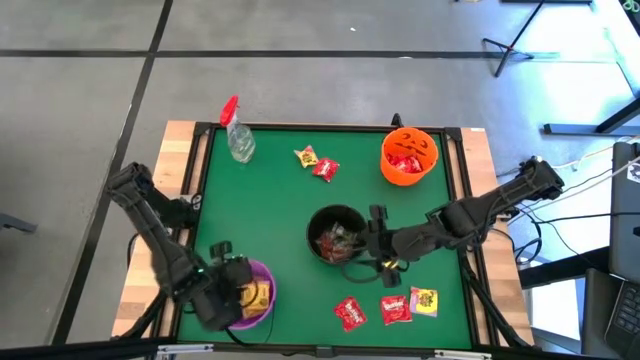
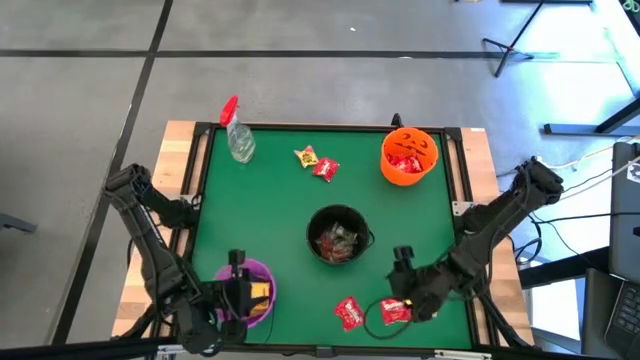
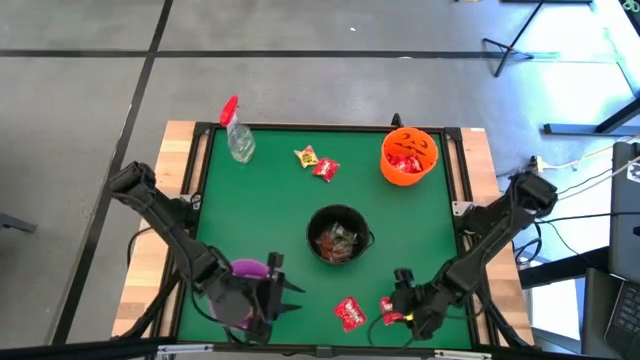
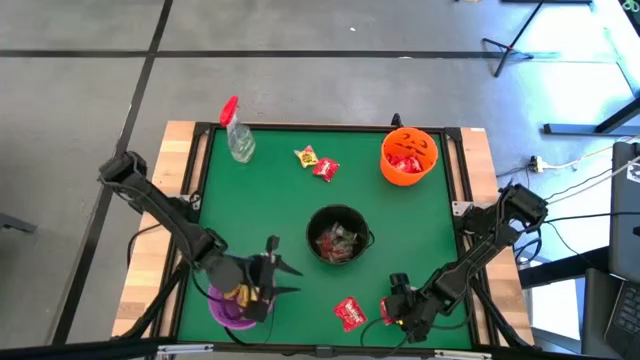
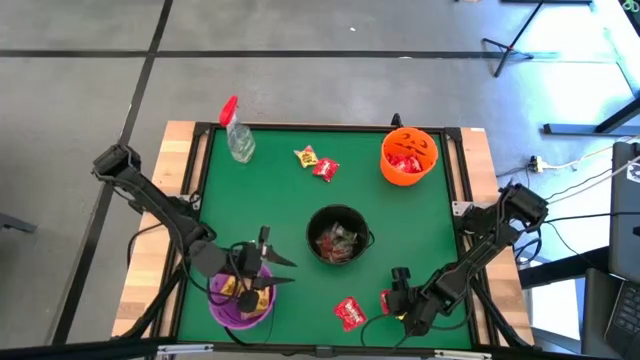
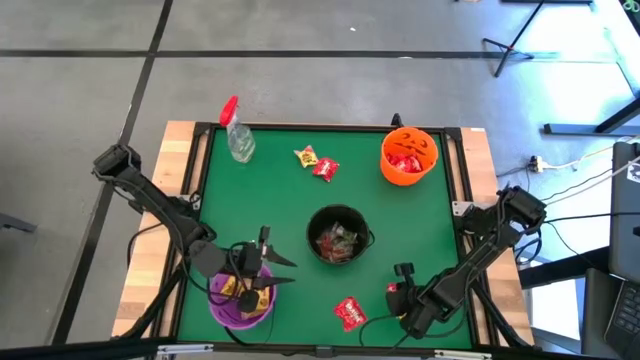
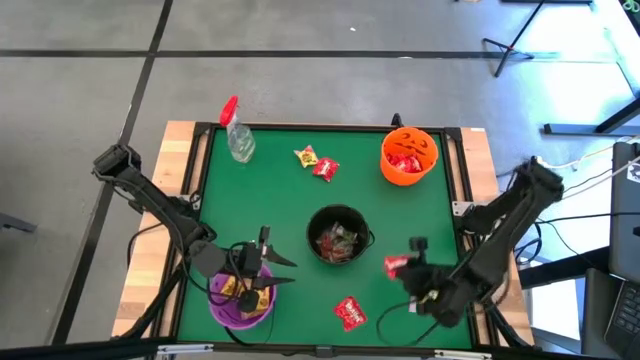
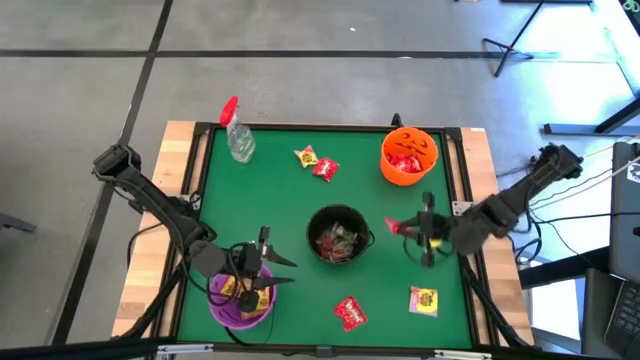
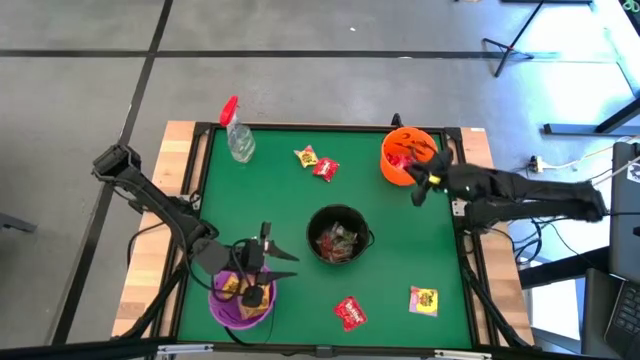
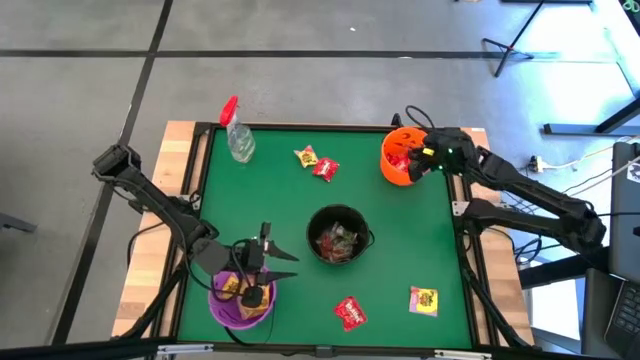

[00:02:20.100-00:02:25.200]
Task: Sort candy
Put the red candy into the orange bucket

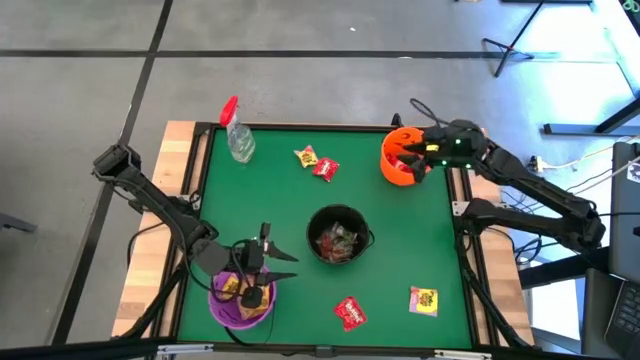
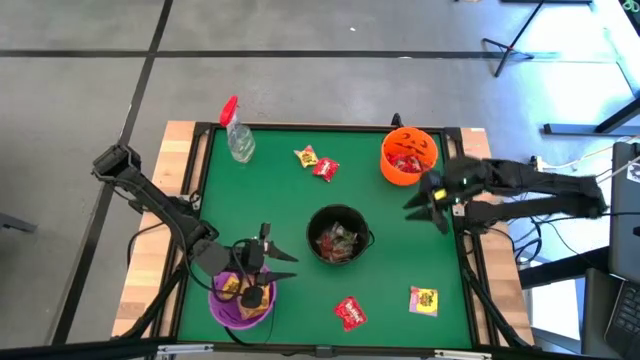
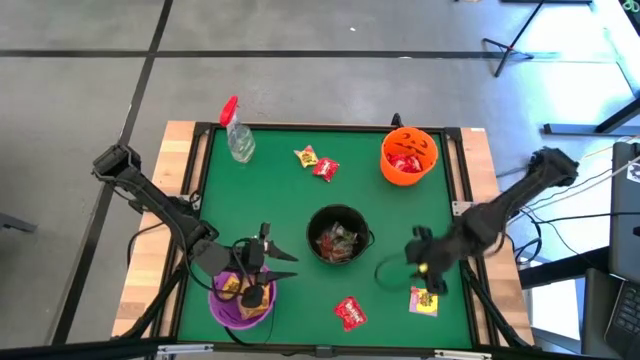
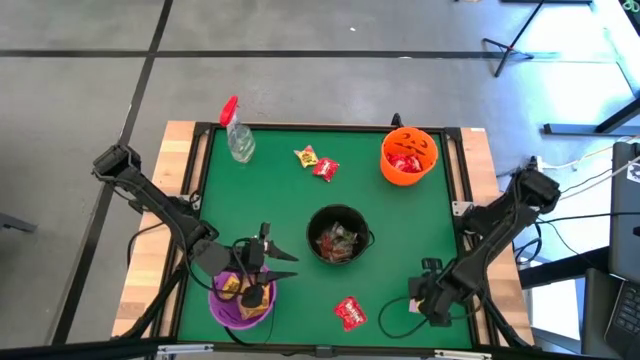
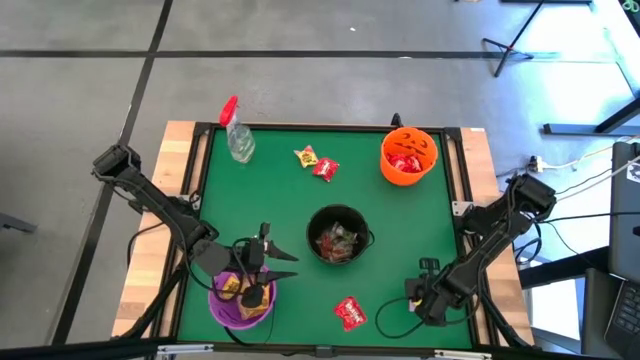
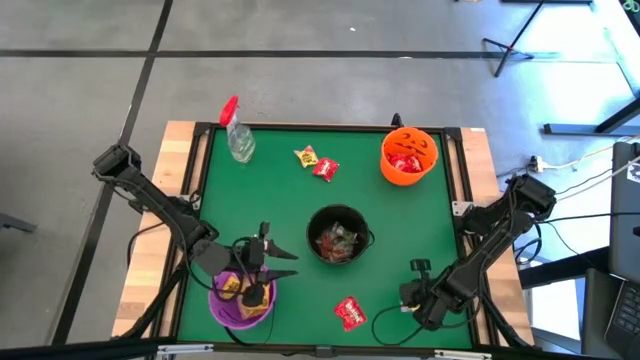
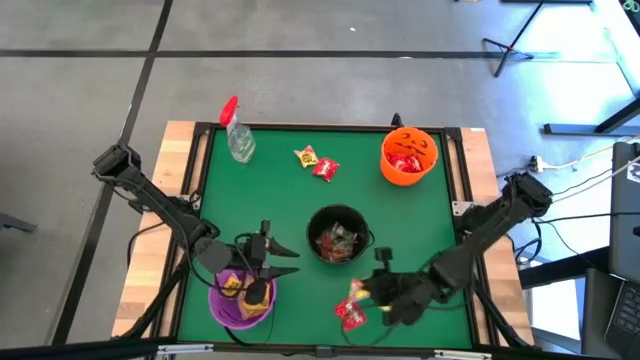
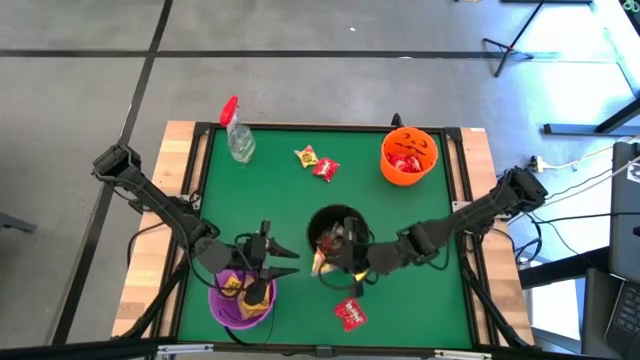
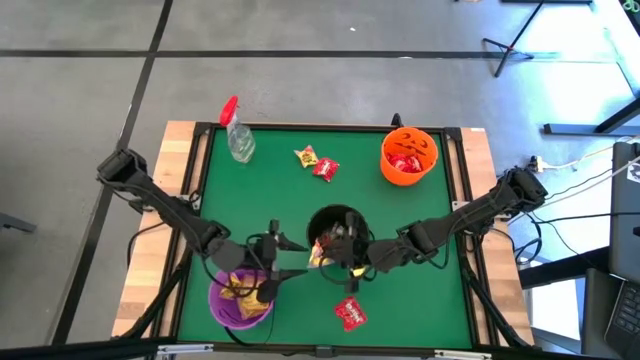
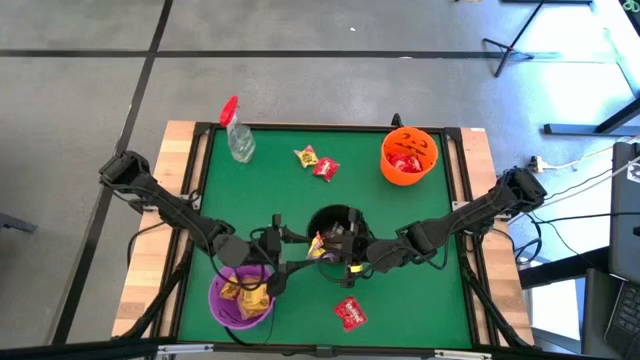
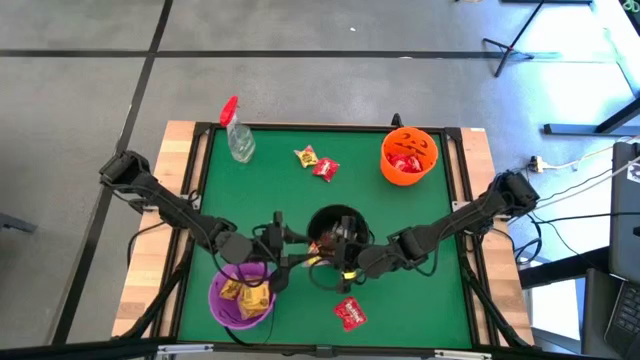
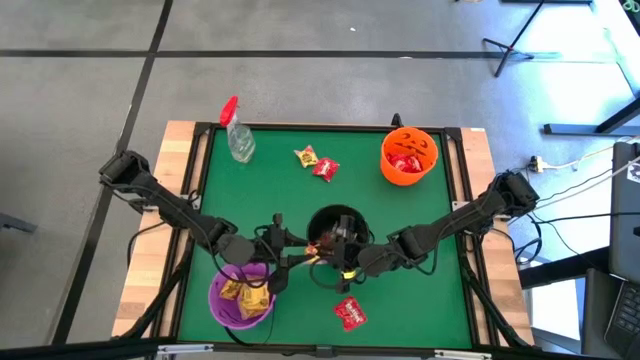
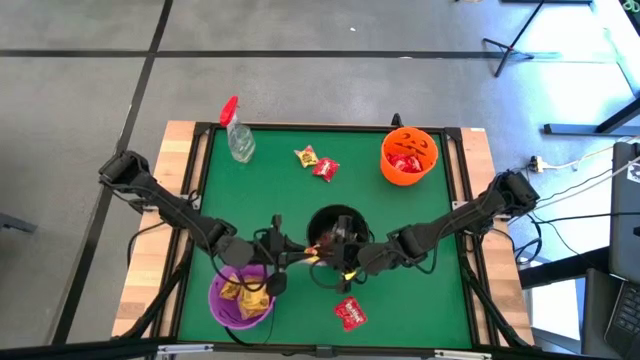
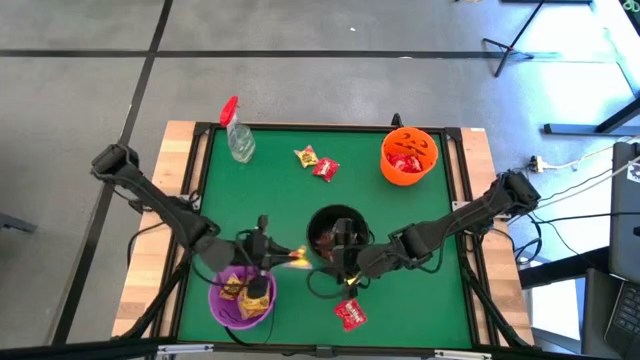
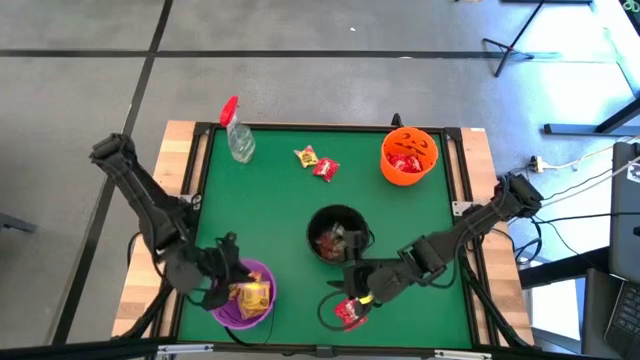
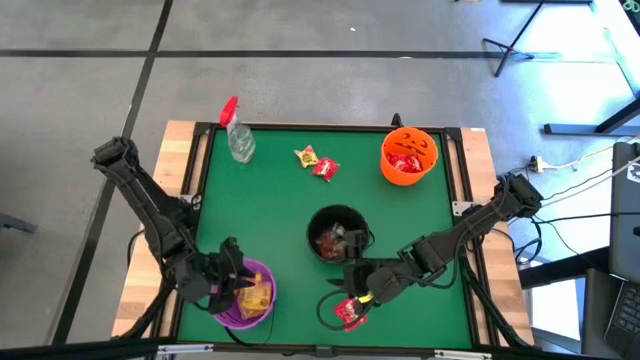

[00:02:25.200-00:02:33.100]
Put the yellow candy into the purple bucket

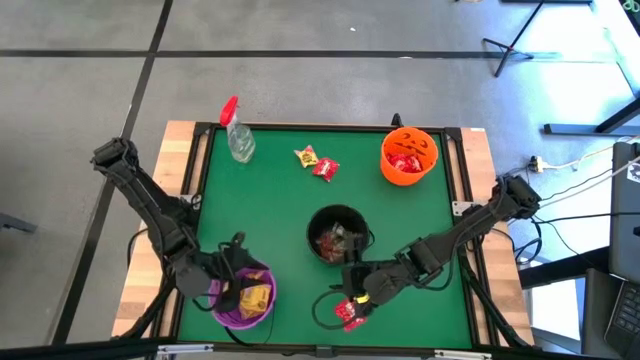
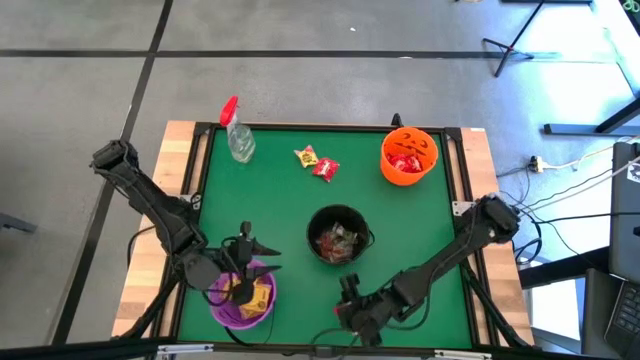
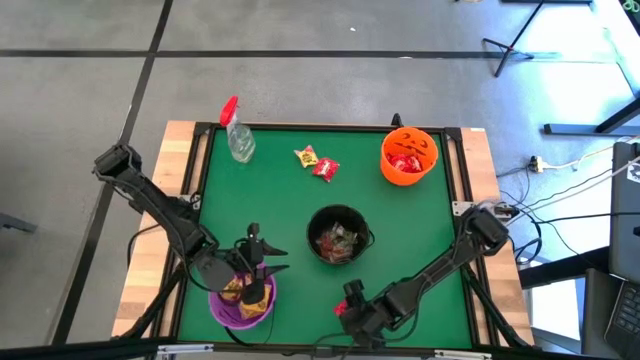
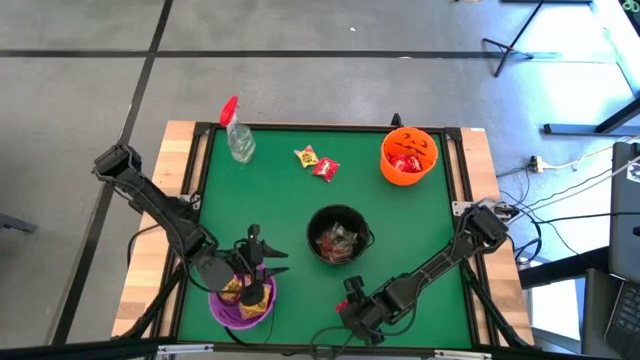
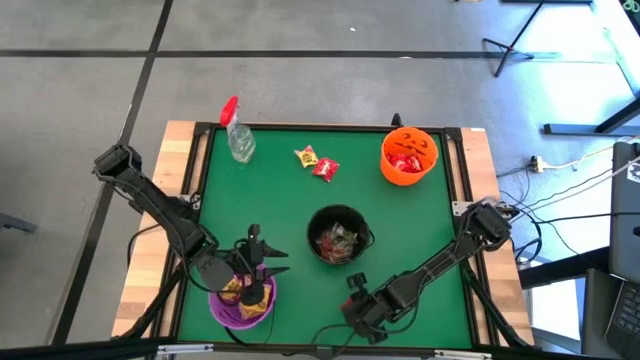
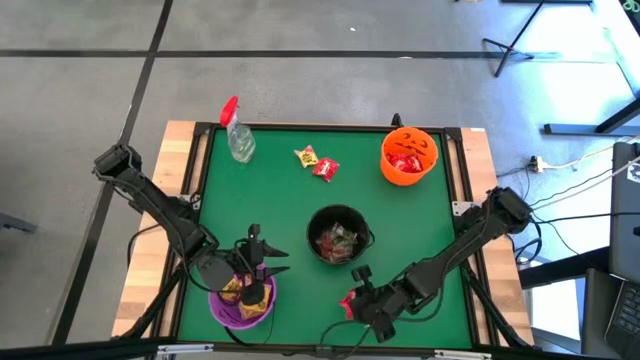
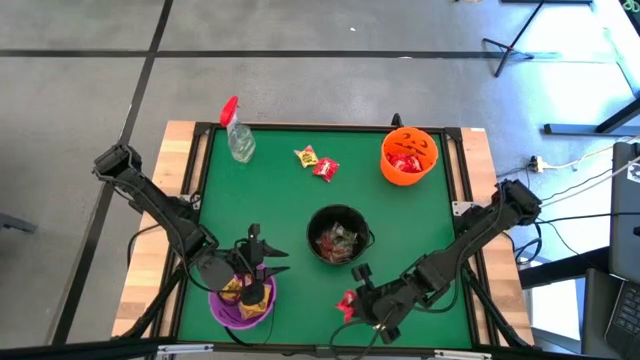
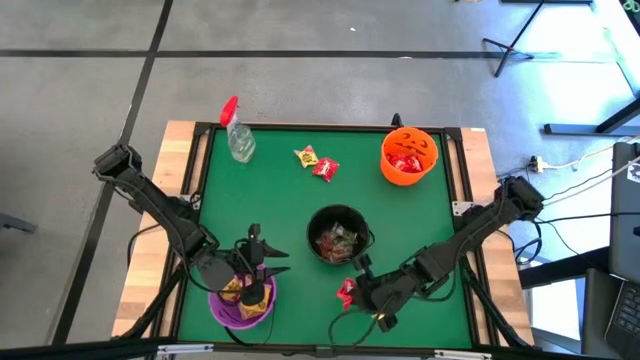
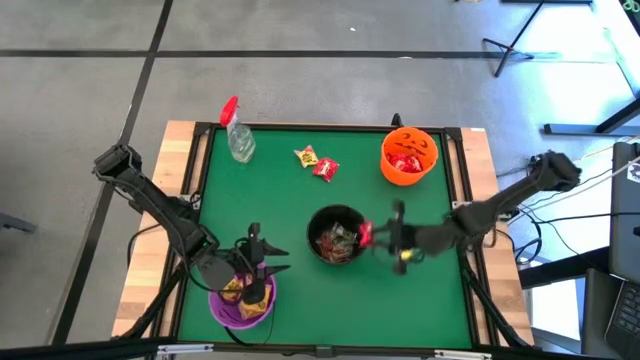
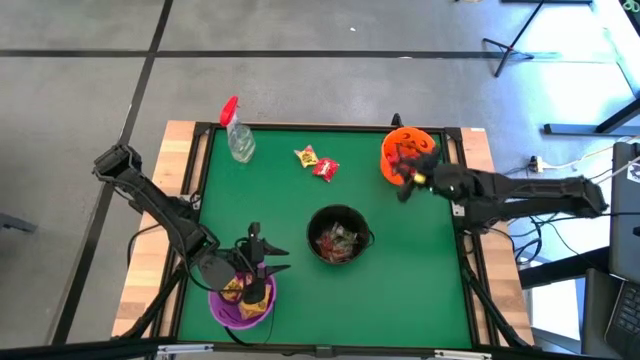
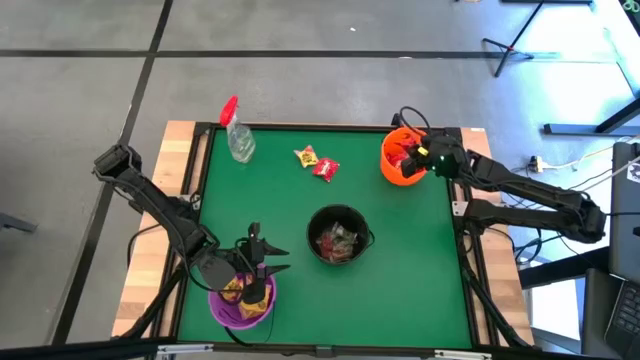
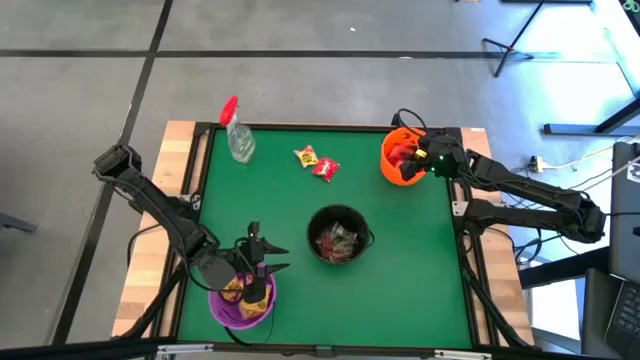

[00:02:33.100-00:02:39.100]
Put the red candy into the orange bucket

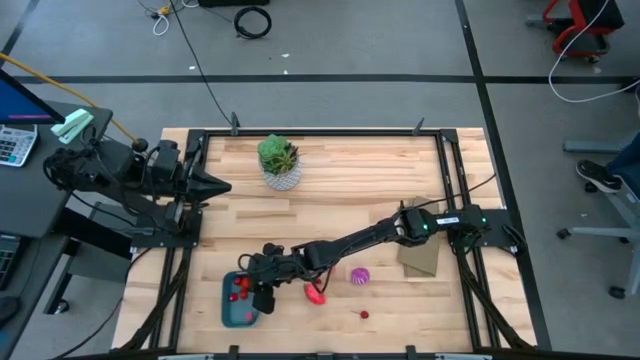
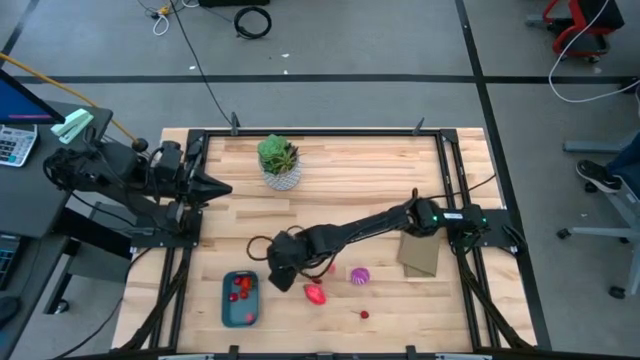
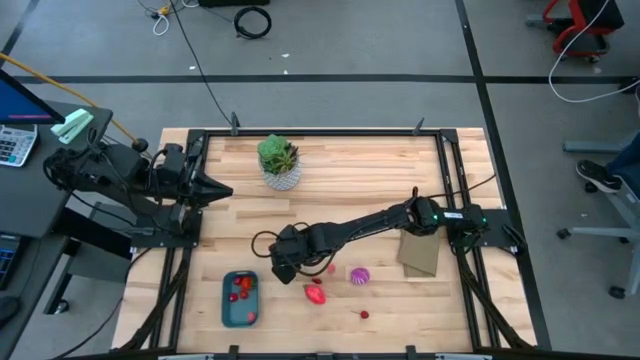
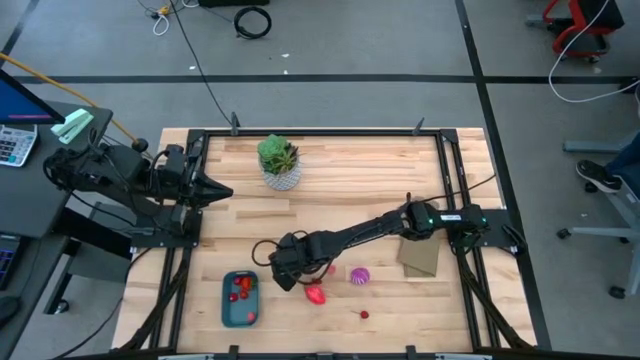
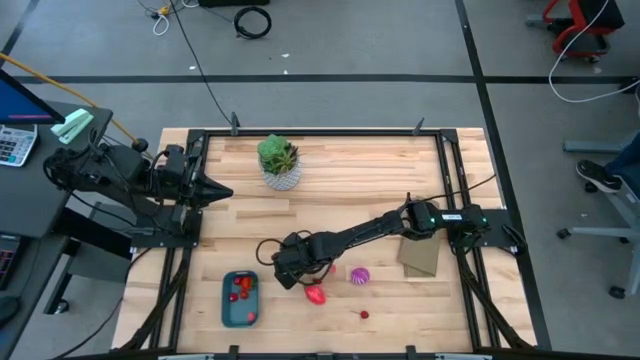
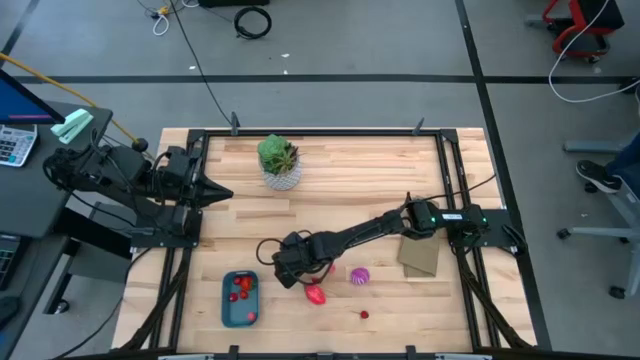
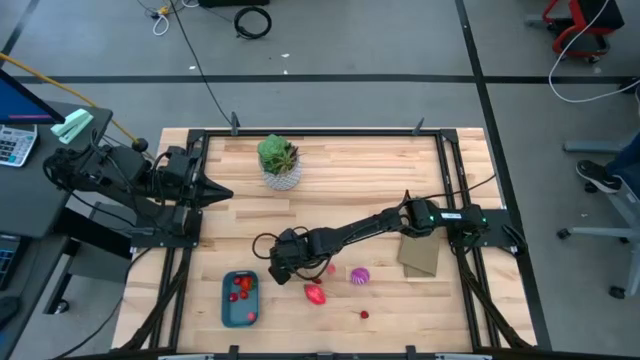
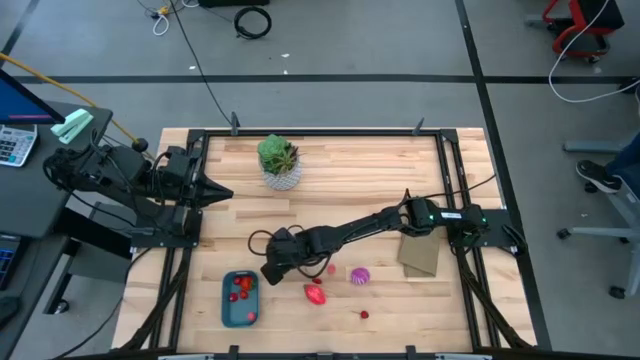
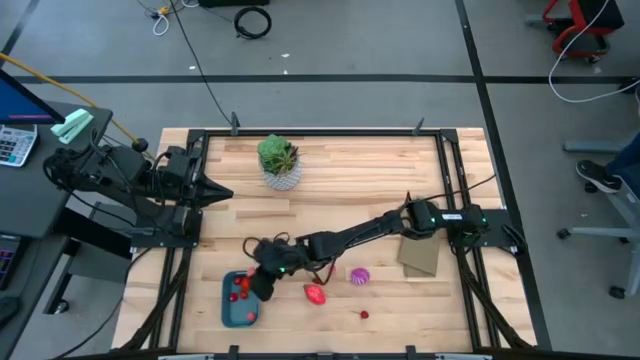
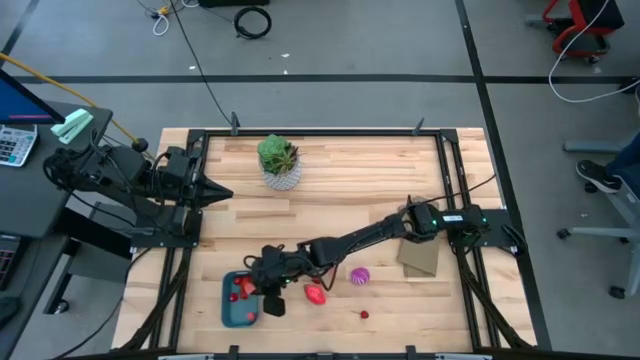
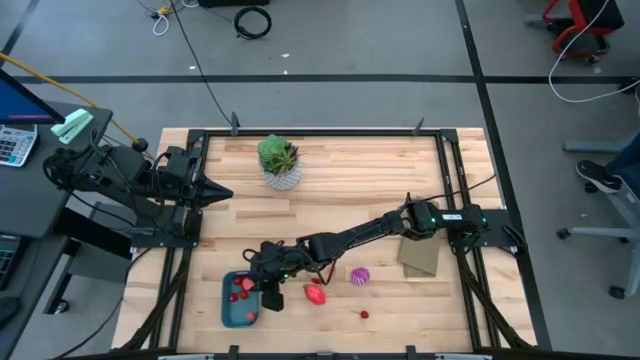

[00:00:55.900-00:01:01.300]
Task: Pick and placing Produce into tupperware
Put the left peach into the bin
